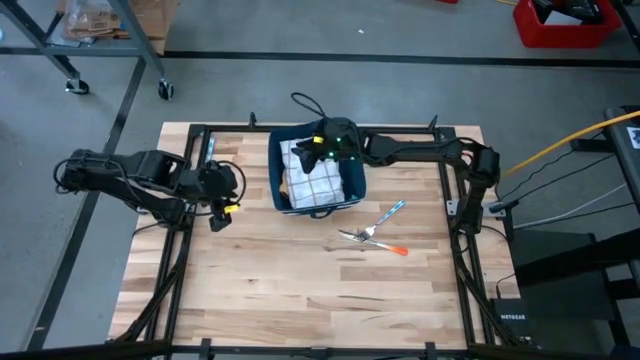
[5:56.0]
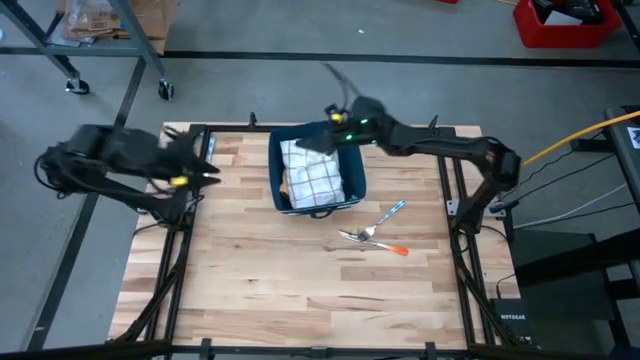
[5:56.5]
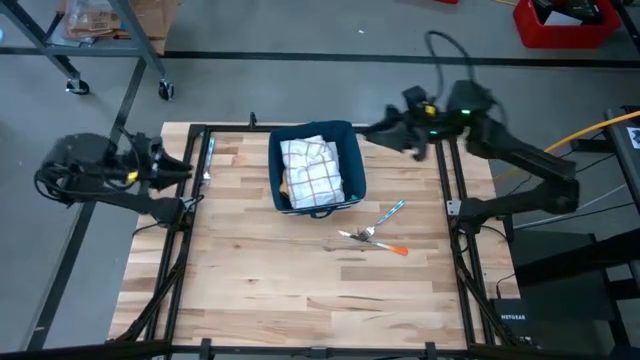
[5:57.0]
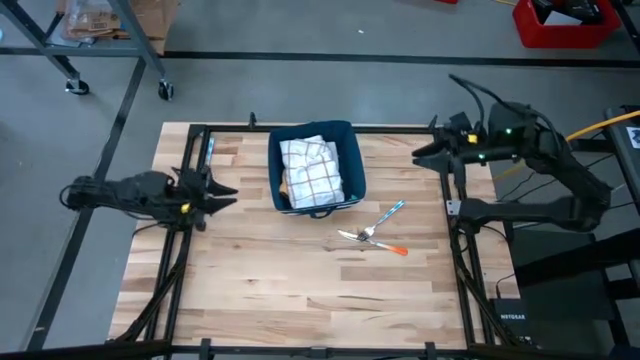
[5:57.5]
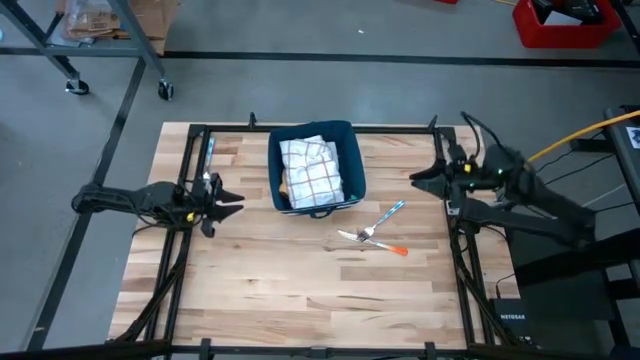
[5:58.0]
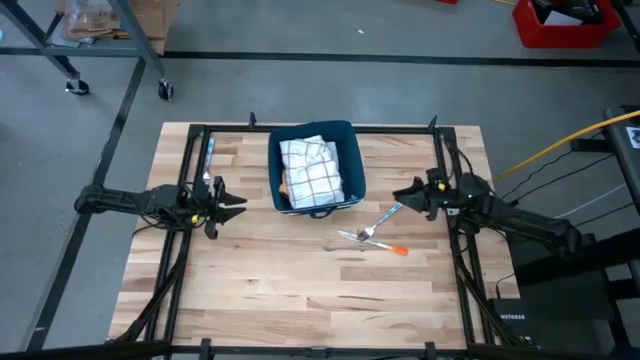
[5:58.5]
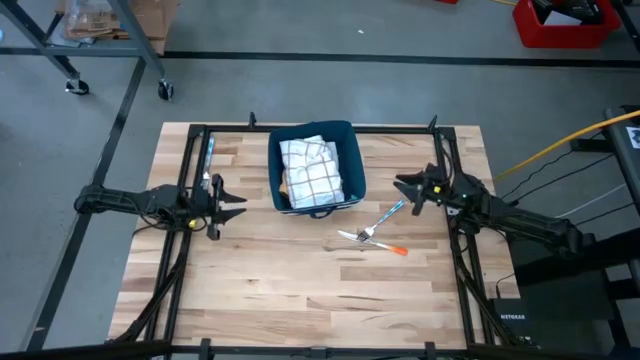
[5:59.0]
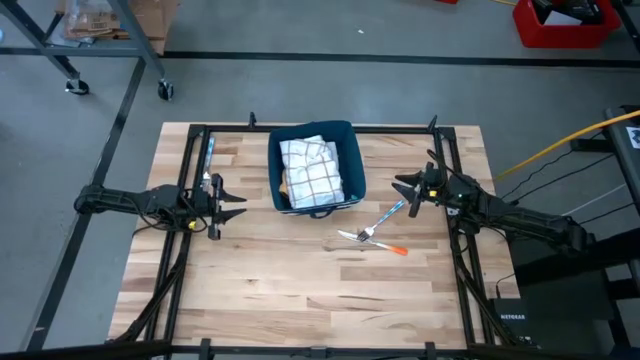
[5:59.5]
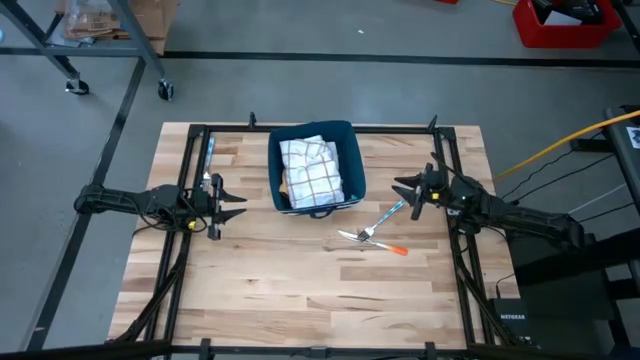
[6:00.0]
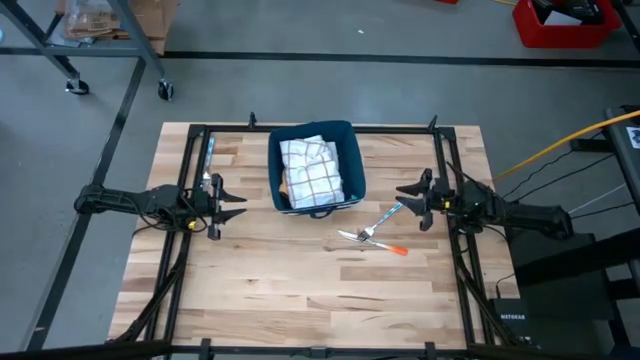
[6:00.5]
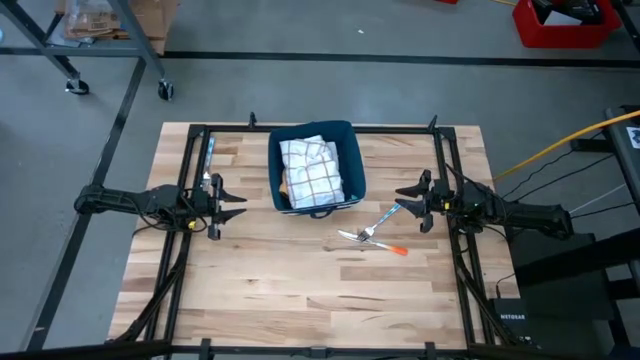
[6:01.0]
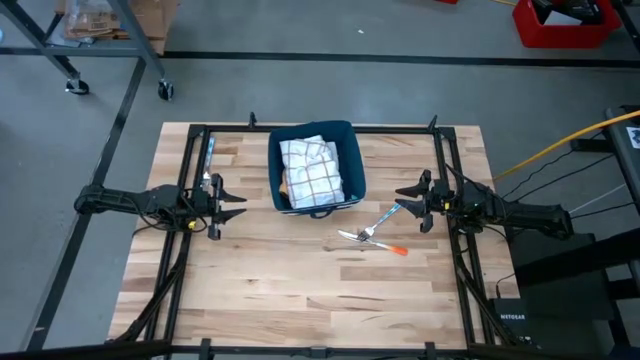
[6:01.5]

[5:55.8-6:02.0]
Task: Fold towel
Return to Home Position

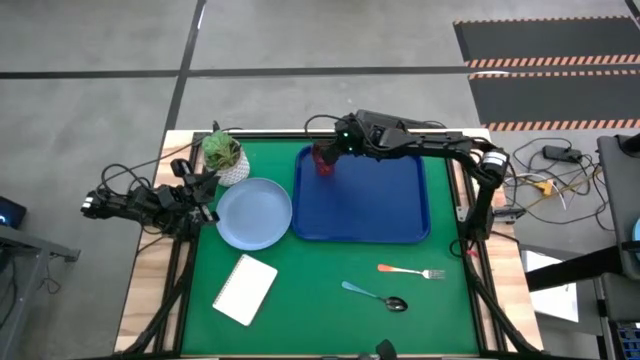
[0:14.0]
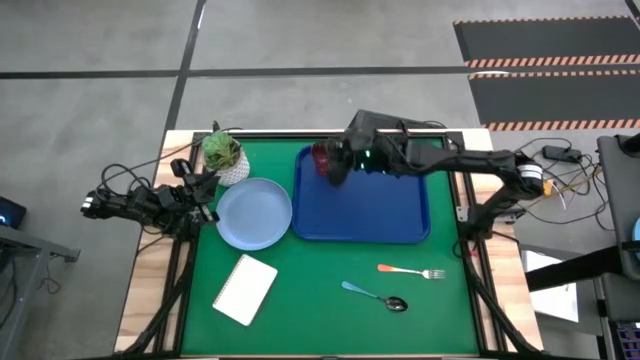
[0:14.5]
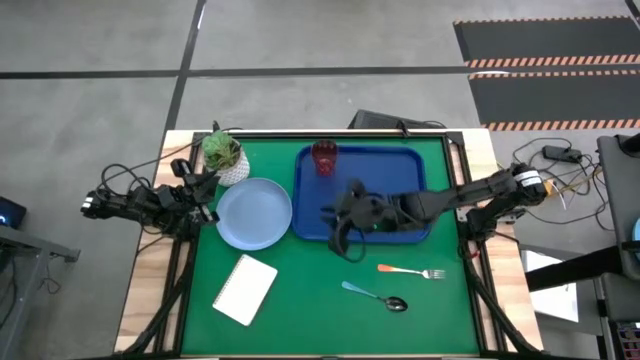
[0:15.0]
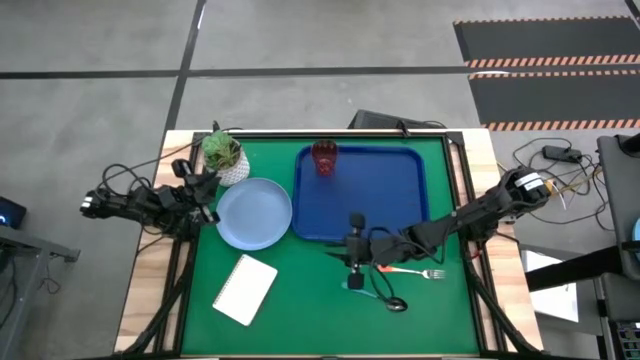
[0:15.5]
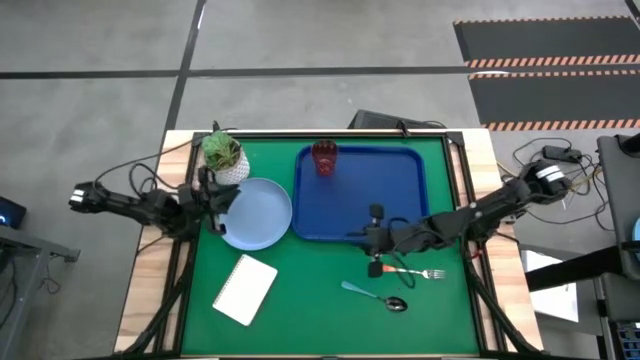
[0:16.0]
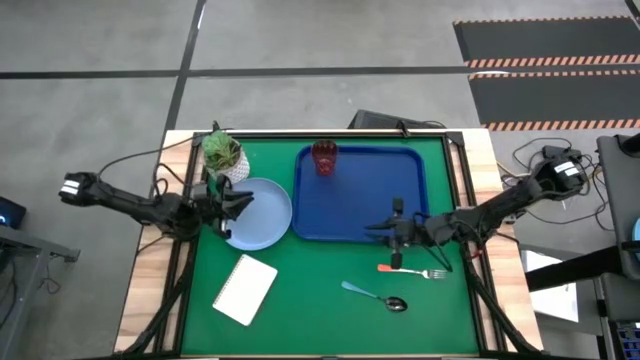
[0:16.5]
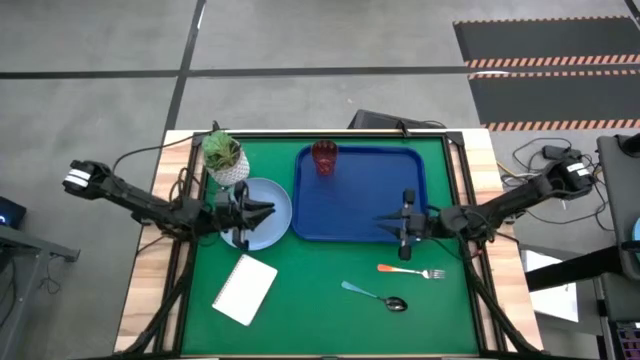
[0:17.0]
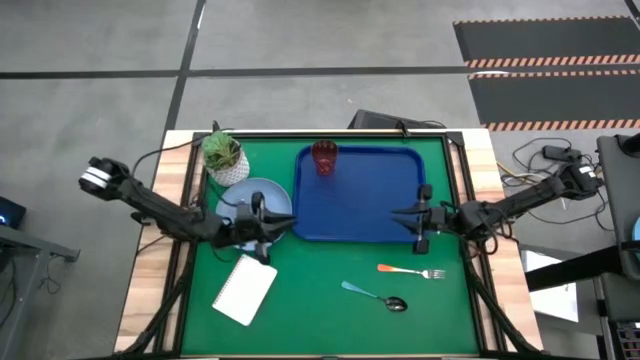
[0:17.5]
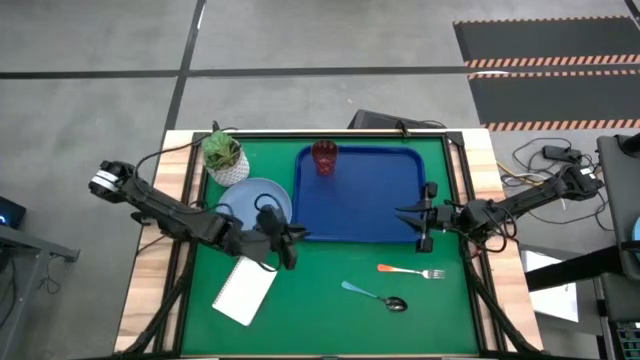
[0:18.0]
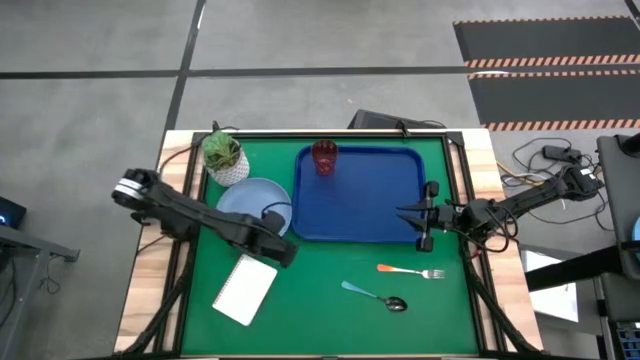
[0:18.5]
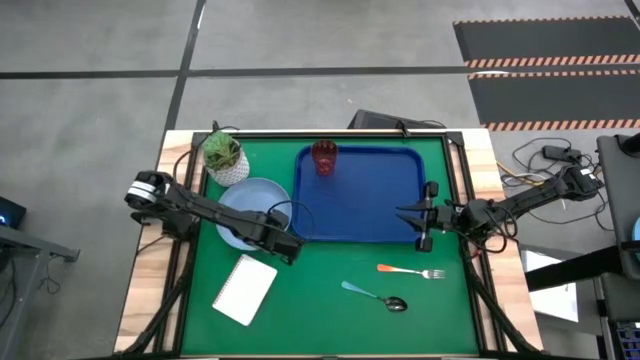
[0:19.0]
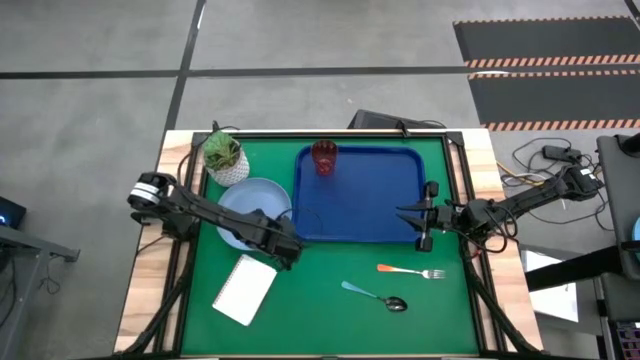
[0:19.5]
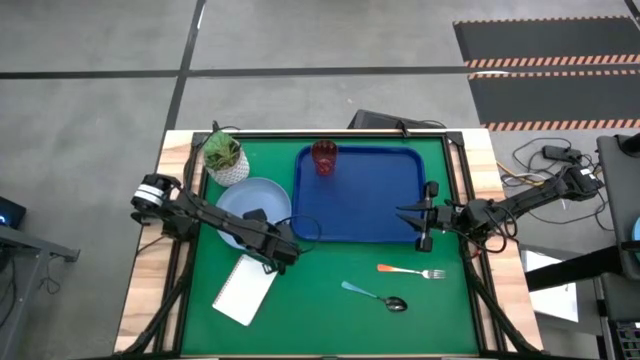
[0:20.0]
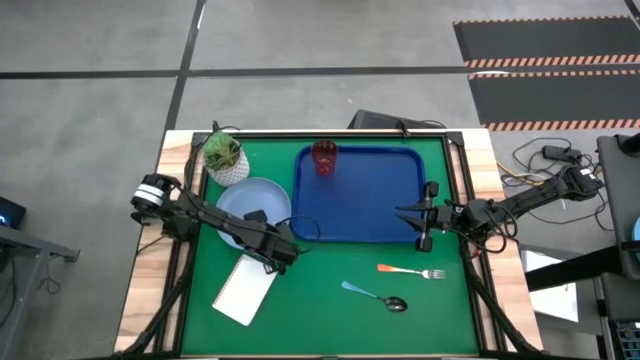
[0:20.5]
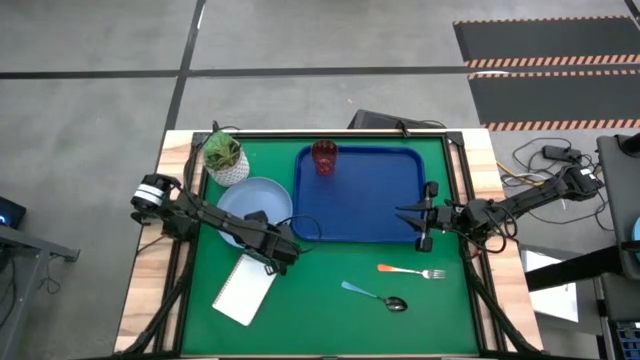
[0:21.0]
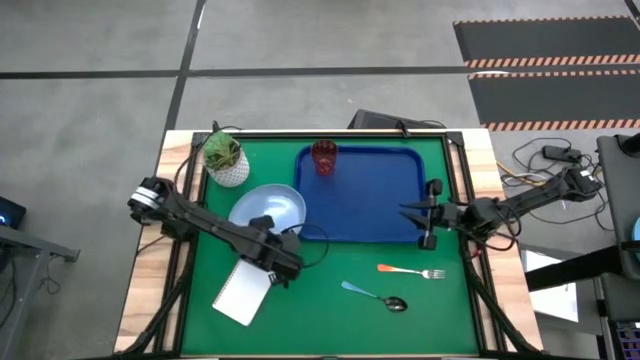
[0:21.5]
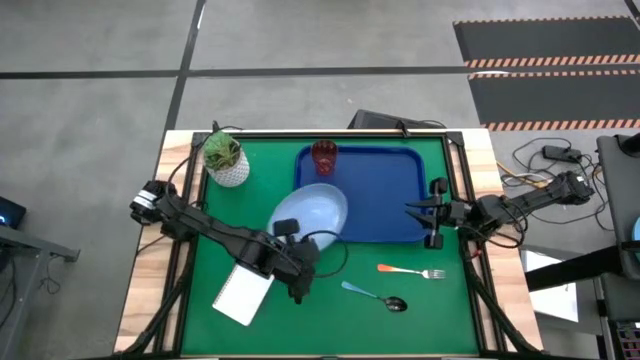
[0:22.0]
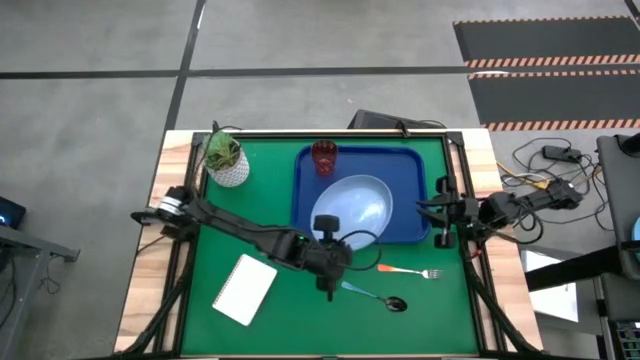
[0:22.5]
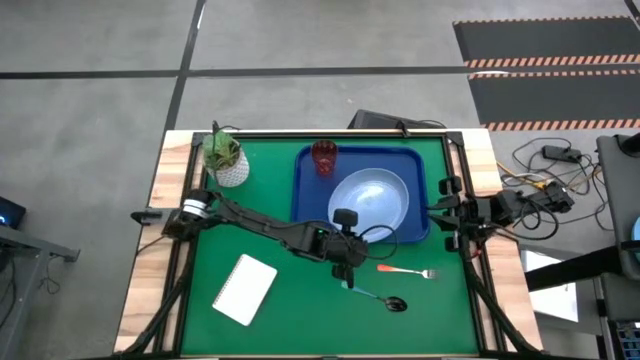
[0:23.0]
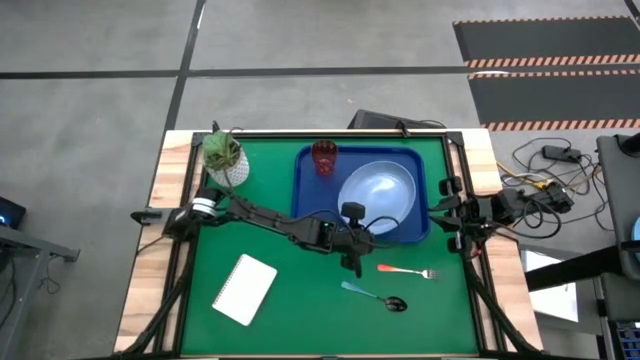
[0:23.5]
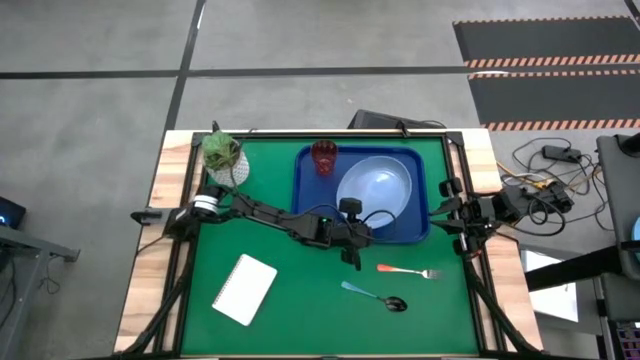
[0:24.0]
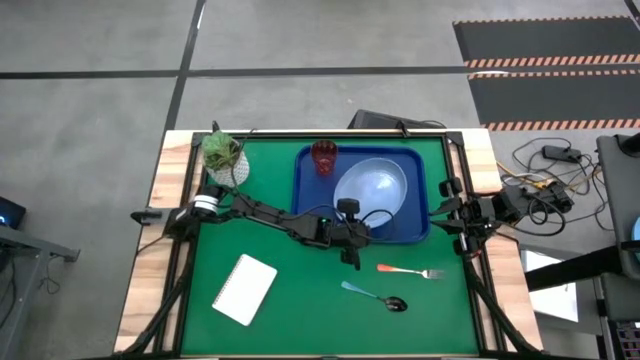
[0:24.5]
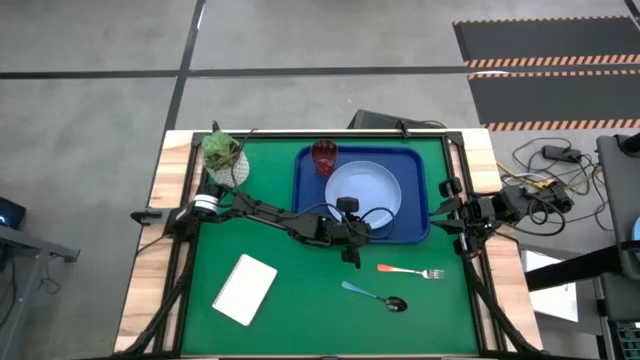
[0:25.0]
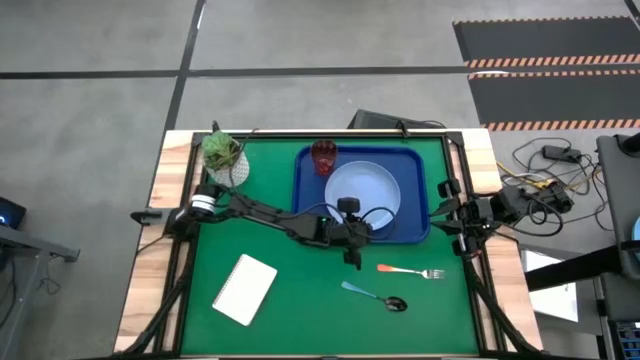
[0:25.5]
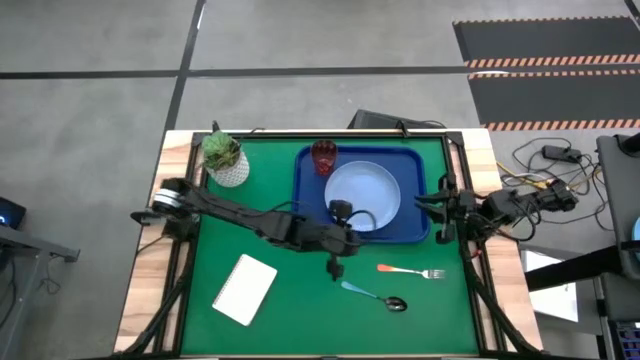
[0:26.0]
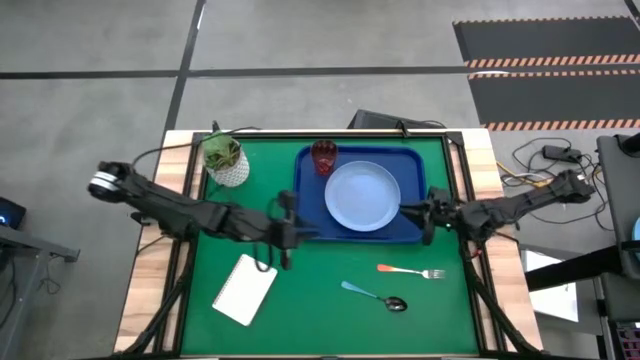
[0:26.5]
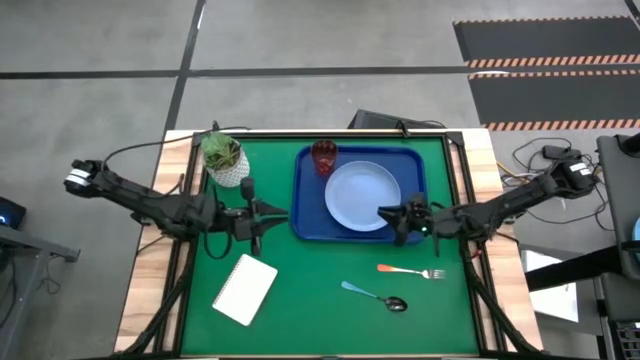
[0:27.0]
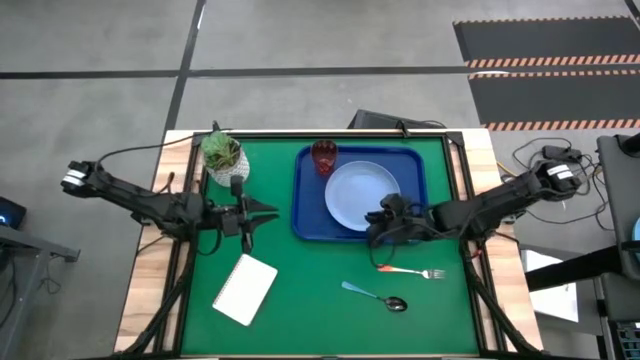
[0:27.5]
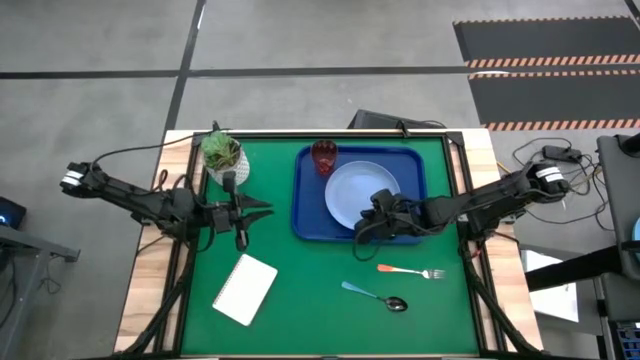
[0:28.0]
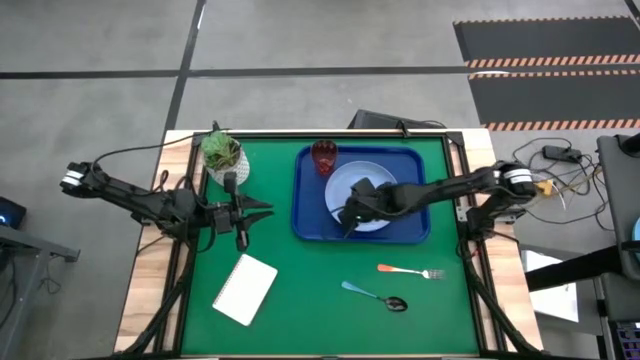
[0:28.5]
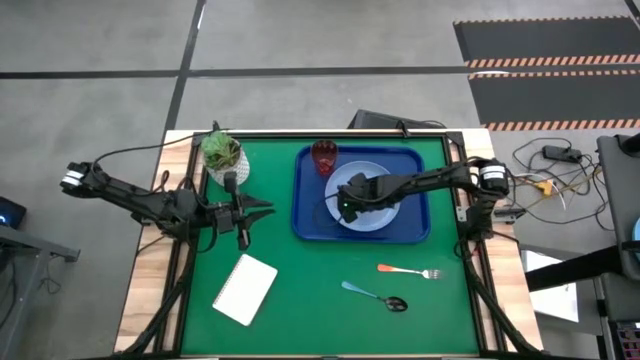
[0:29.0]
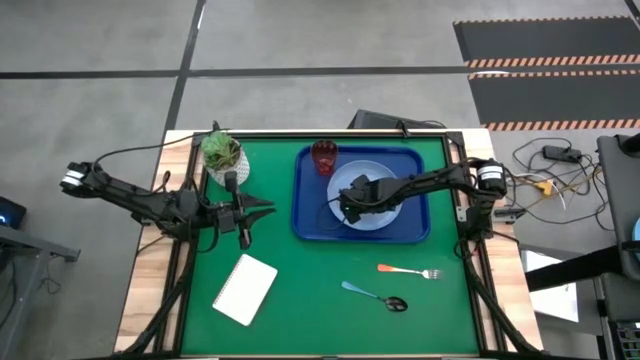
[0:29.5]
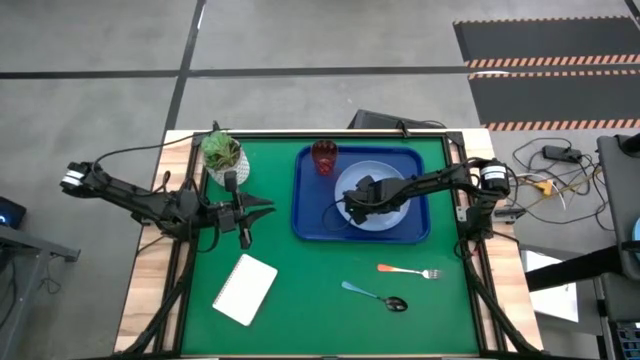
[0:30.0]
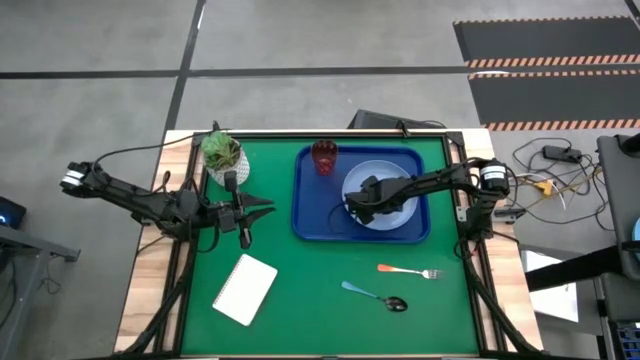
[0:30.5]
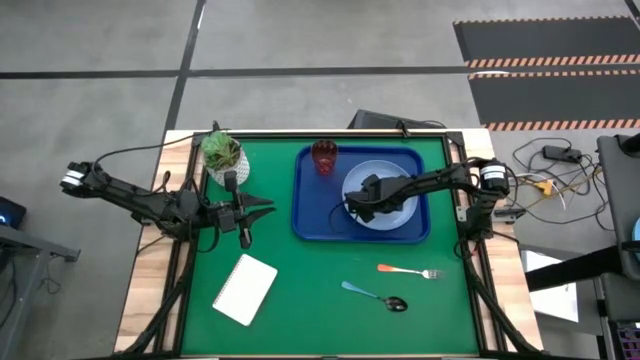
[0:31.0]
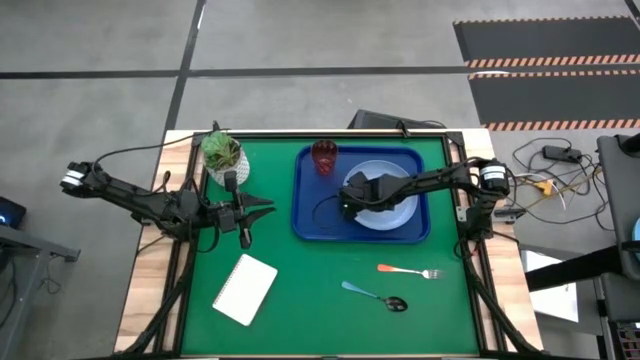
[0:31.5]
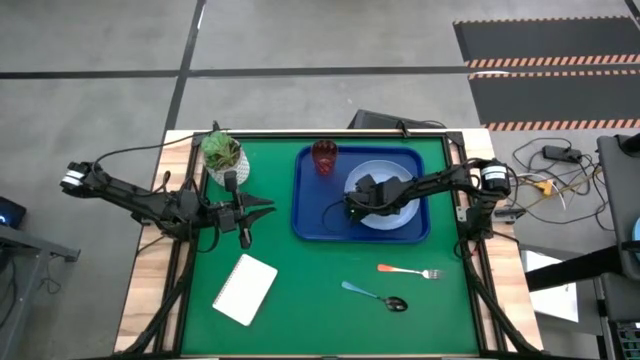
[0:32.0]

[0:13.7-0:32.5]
Task: Pick and place plate/cup/fork/spoon on tray
Put the blue plate on the blue tray to the bottom right of the orange glass
